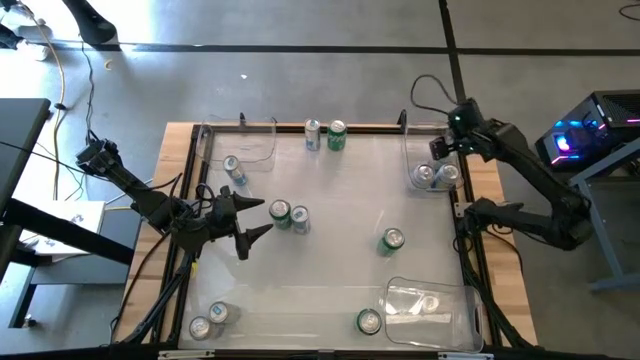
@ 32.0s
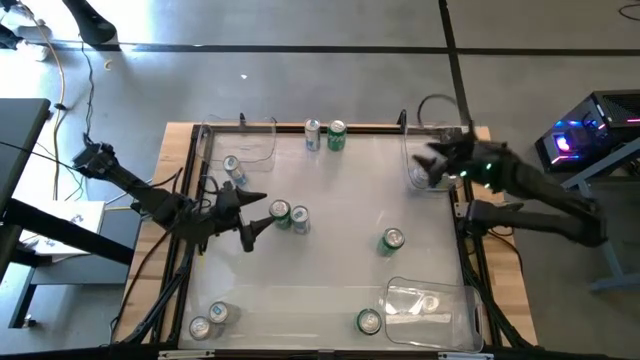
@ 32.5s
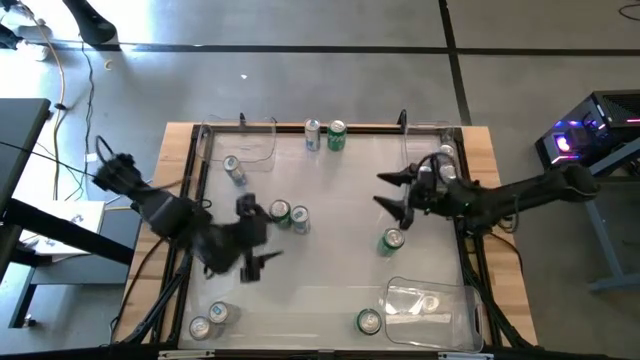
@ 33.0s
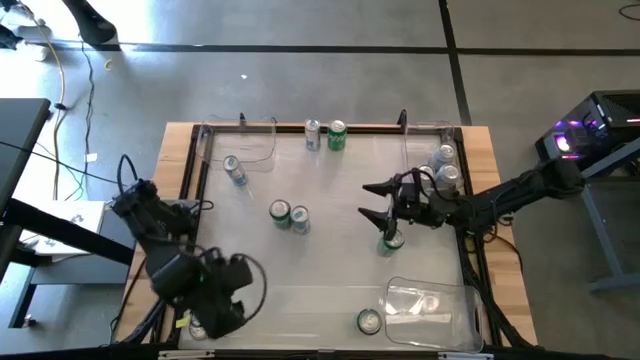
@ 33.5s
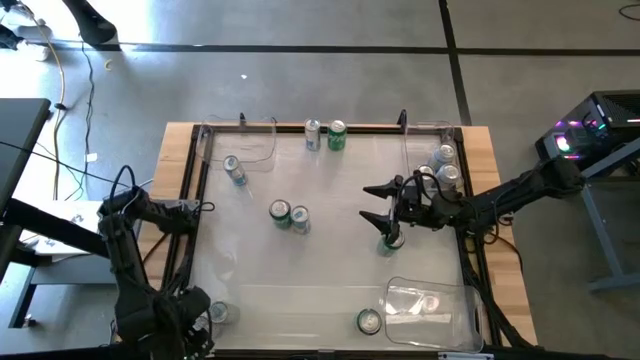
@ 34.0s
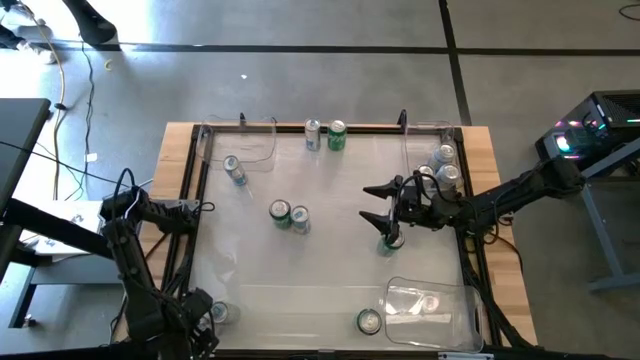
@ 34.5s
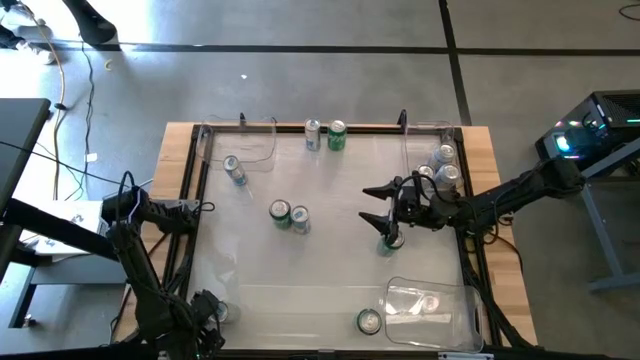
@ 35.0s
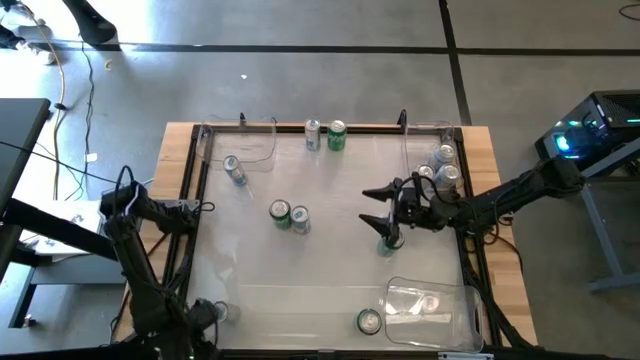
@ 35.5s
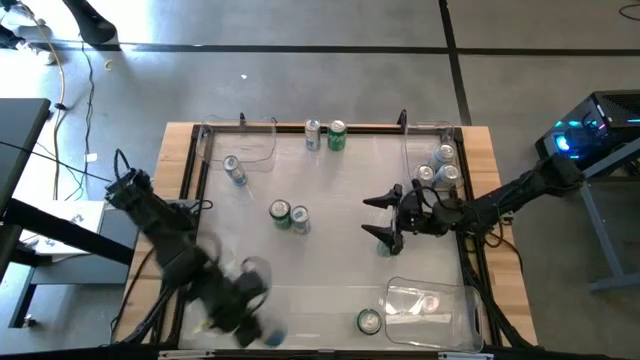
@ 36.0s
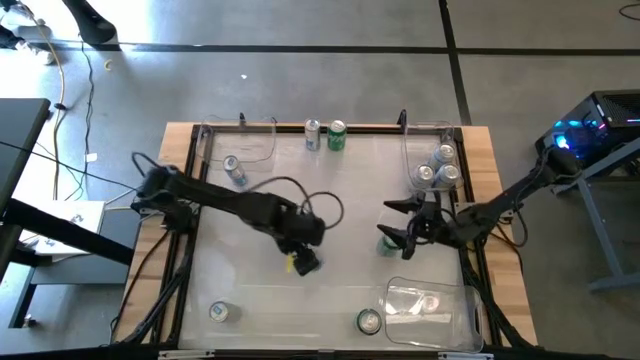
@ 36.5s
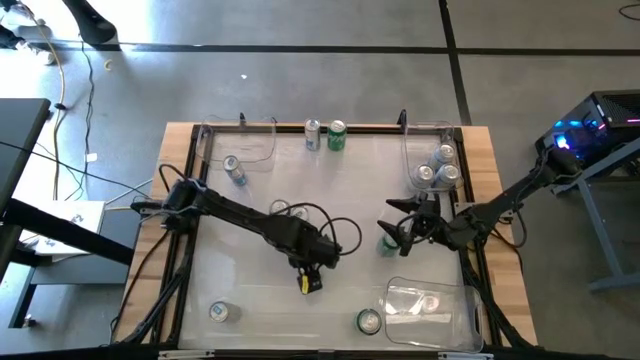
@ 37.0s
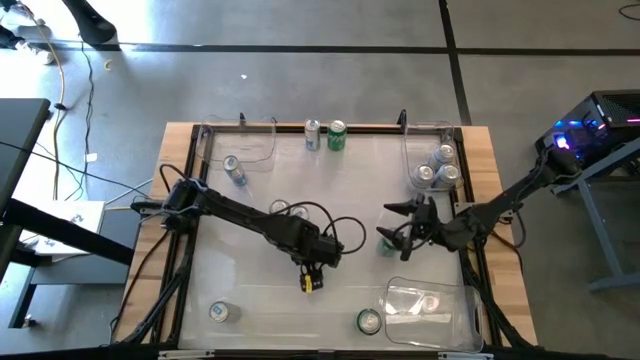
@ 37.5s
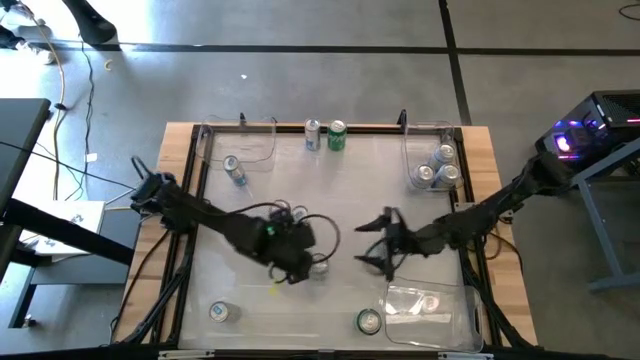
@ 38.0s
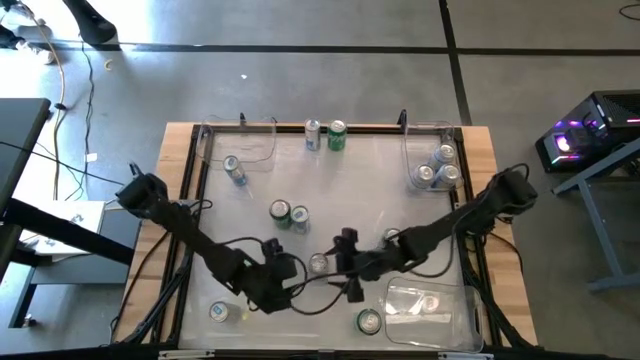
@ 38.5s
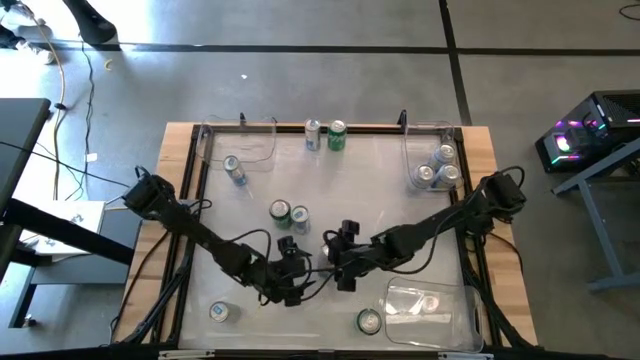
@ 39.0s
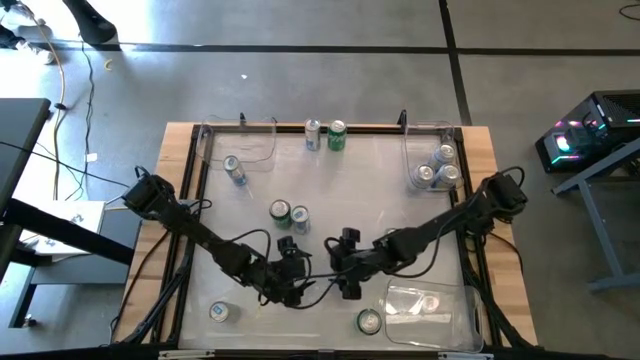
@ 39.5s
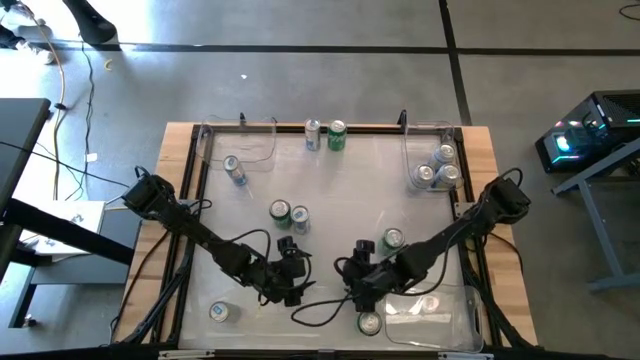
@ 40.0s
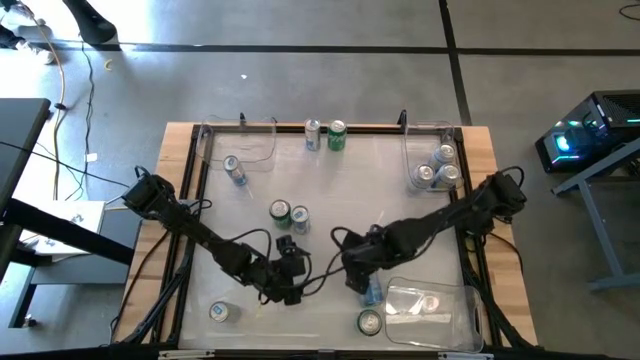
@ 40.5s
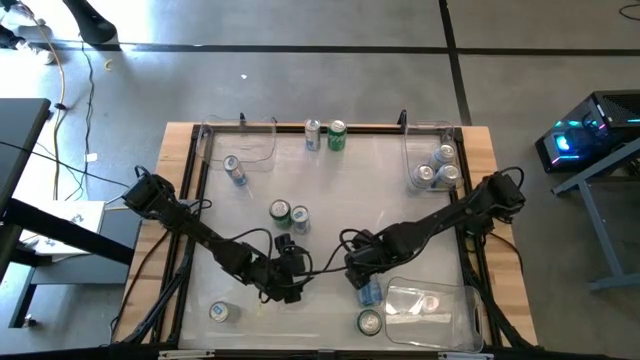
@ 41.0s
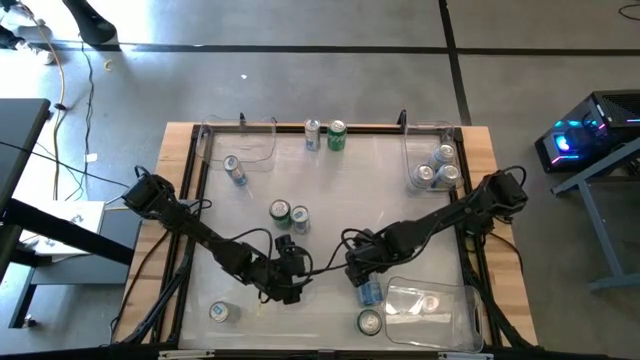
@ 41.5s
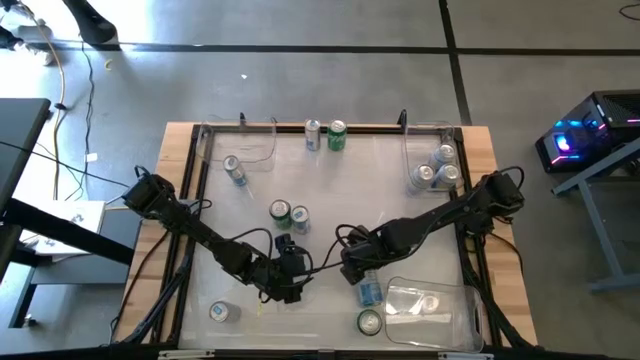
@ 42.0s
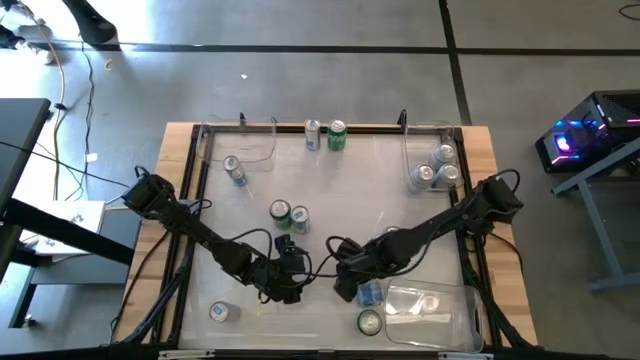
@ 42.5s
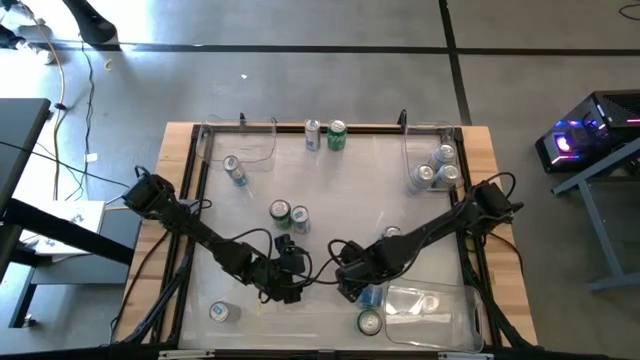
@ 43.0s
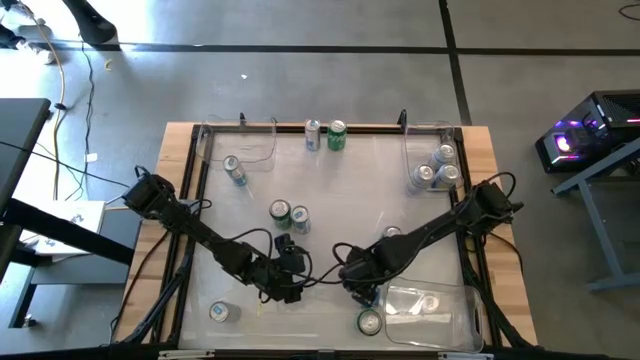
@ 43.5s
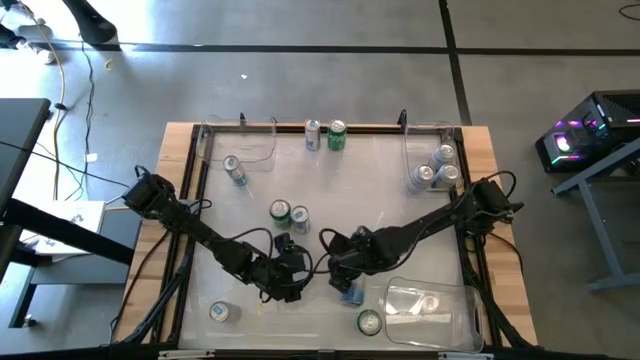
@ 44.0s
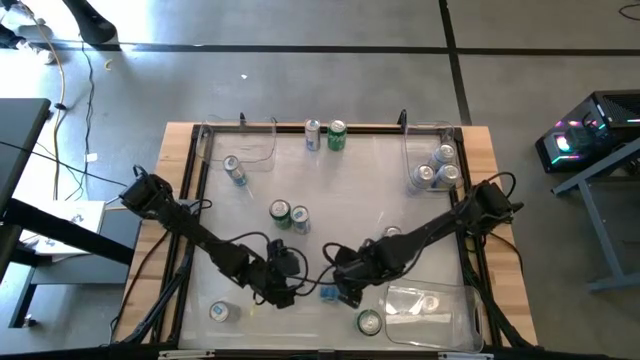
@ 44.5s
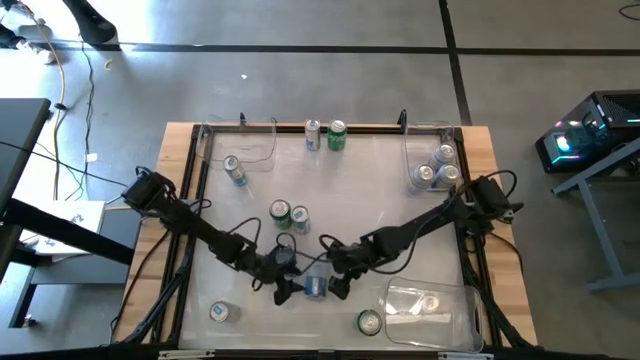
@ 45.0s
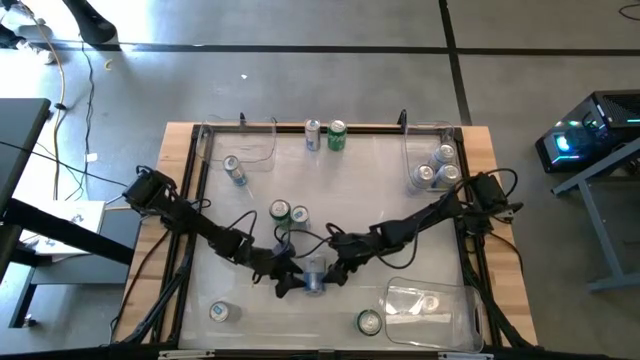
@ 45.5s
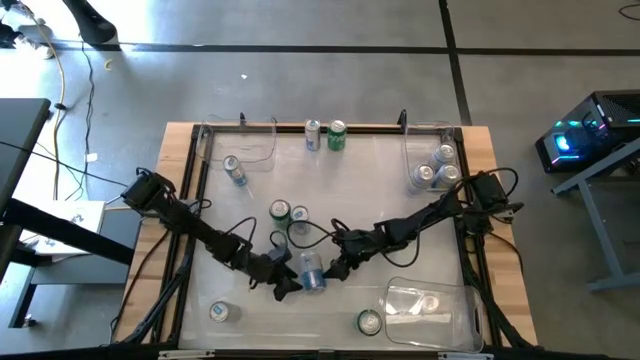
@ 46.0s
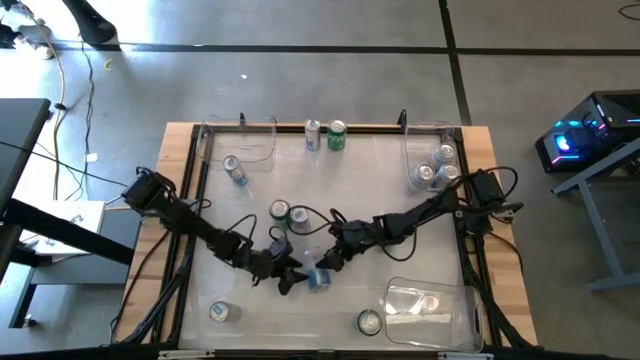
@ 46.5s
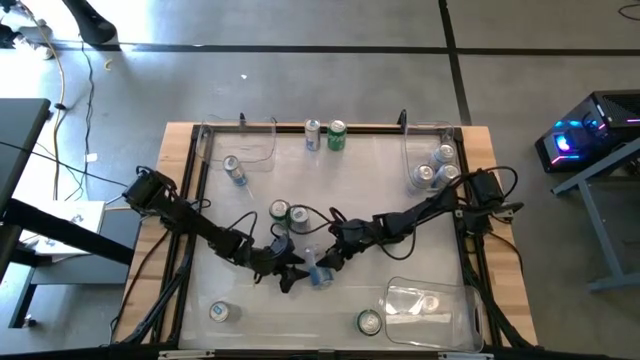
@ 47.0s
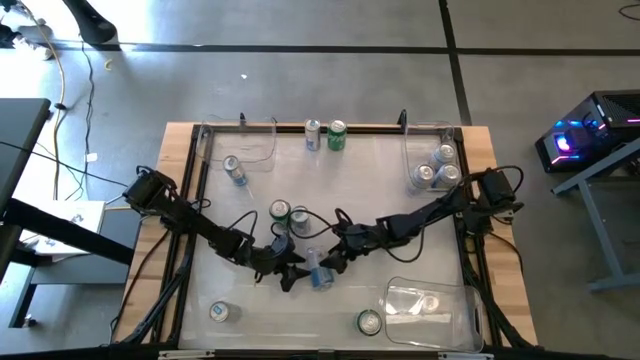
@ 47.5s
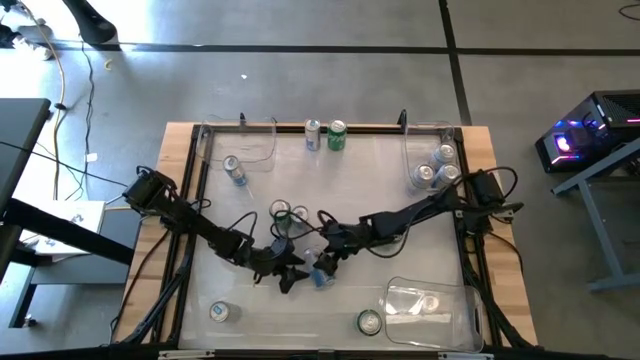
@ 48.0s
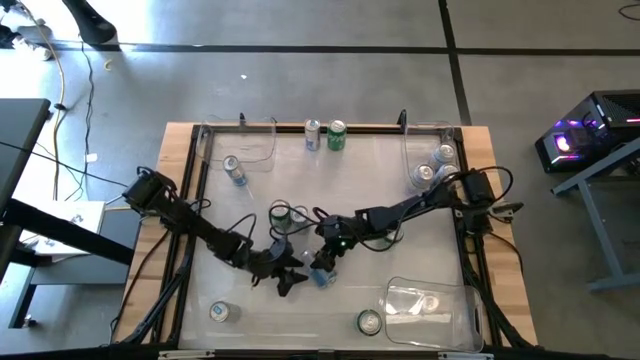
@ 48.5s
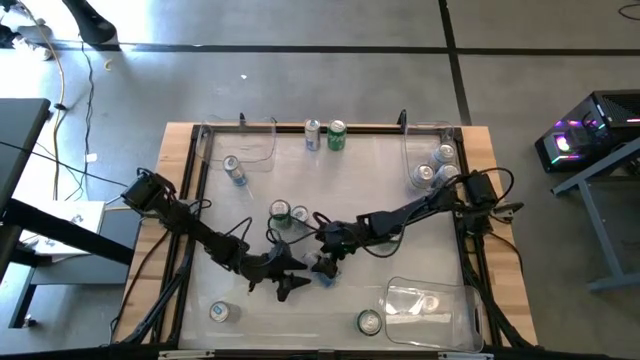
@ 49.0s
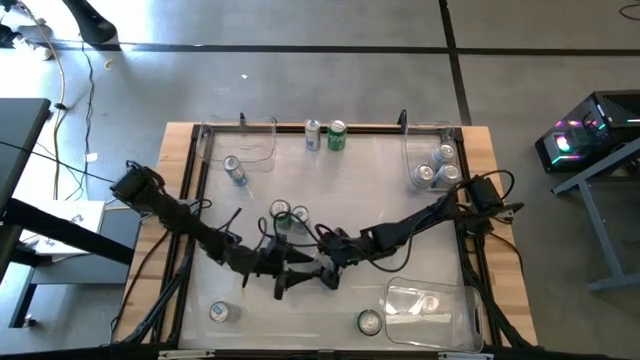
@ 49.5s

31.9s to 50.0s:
Task: Sort soda cans
Put the blue white soda can into the top right transparent bin

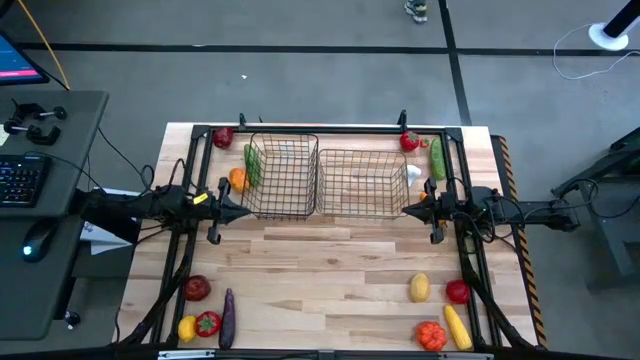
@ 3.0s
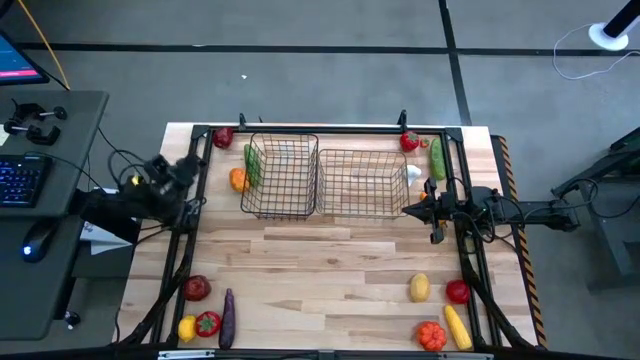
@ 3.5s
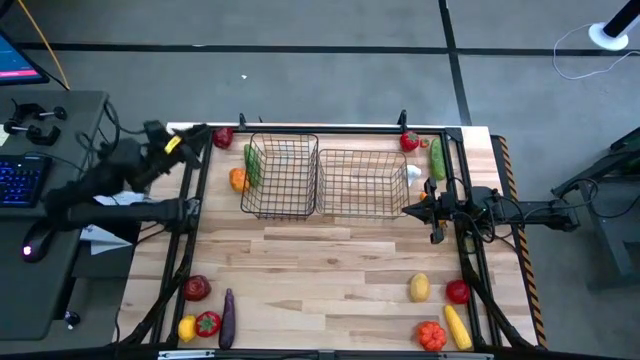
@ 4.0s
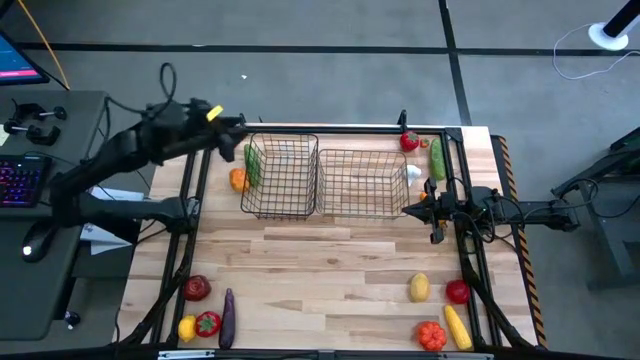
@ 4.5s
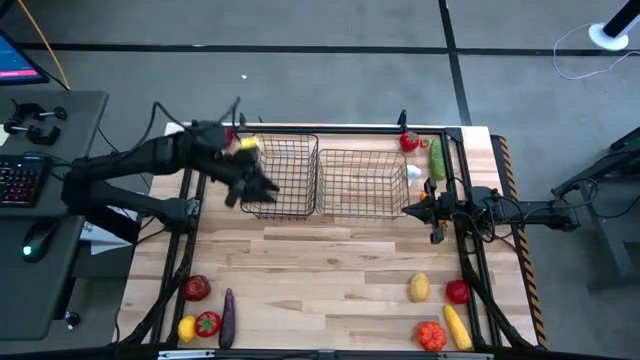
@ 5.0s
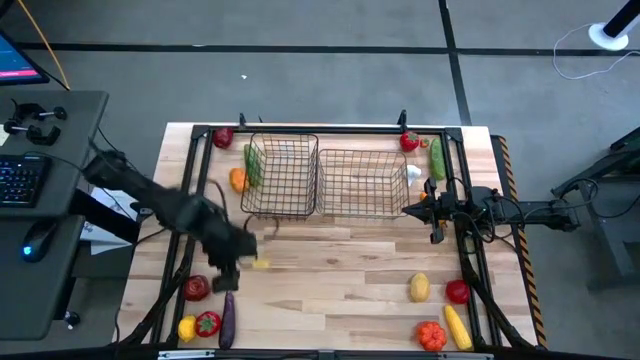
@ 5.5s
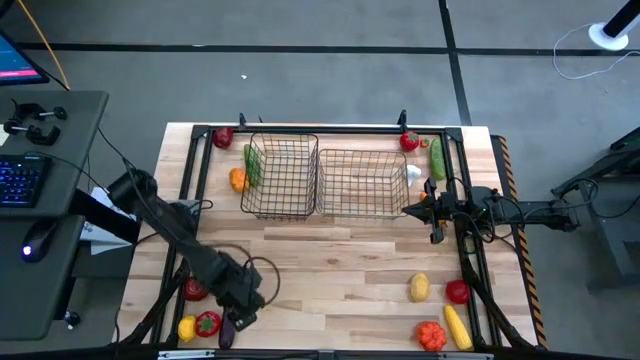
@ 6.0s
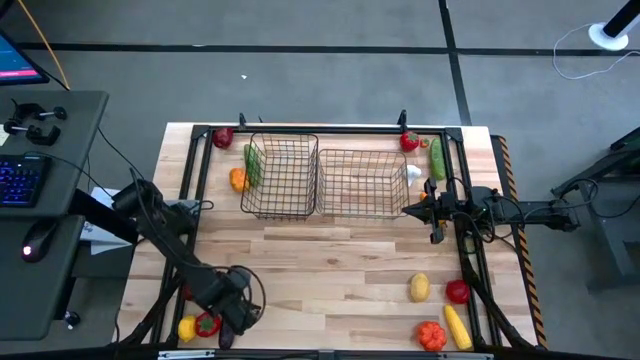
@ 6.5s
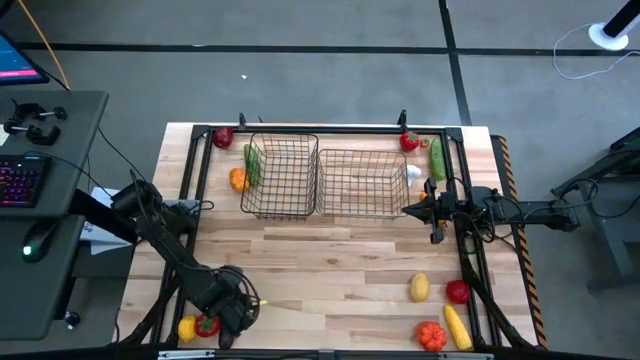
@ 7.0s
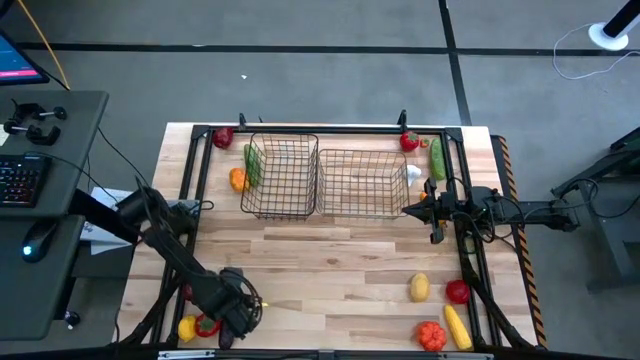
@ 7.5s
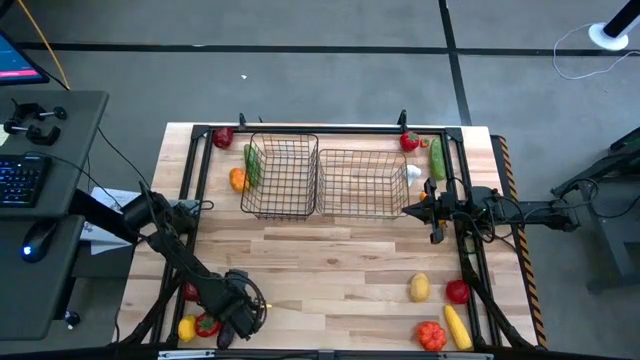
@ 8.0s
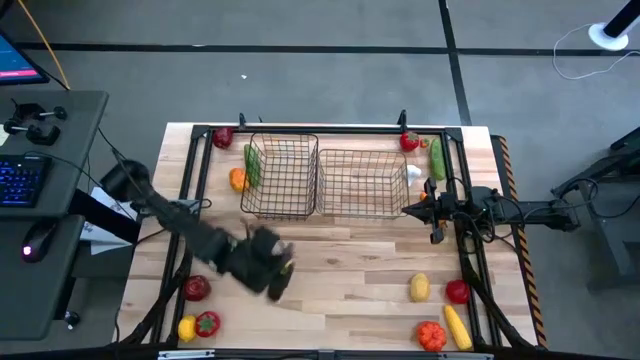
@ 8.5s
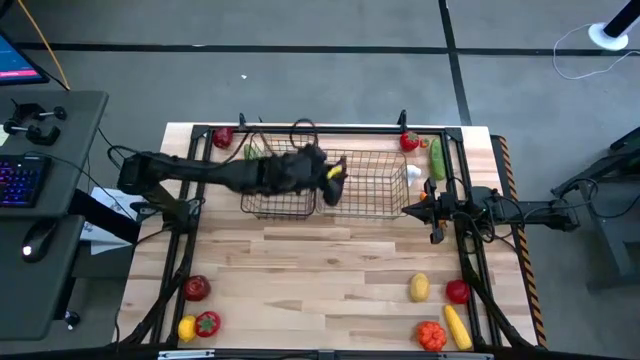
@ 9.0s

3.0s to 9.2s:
Task: Sort produce into baskets
Put the eggplant into the right wire basket
